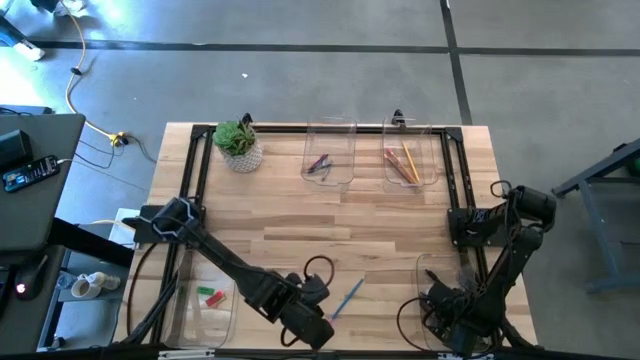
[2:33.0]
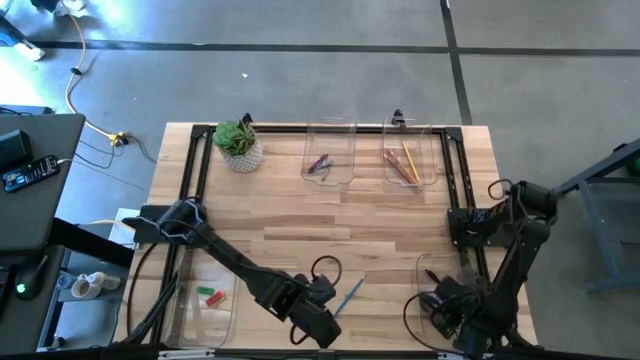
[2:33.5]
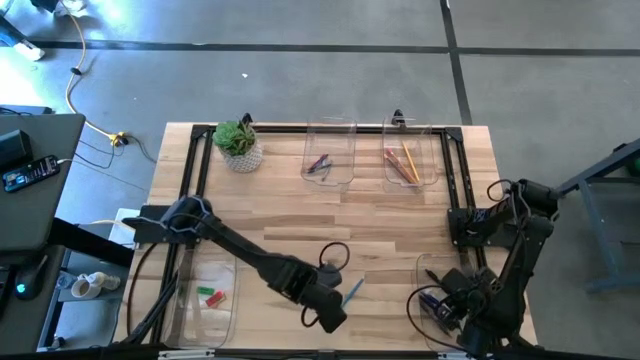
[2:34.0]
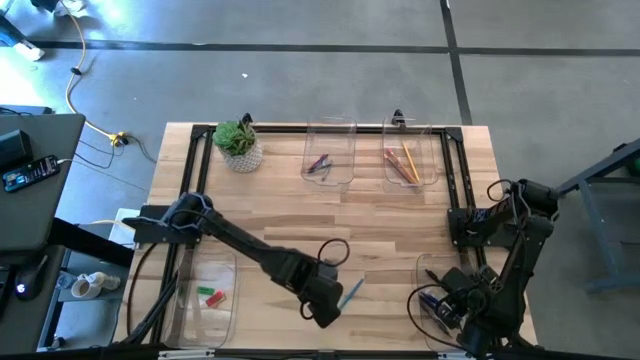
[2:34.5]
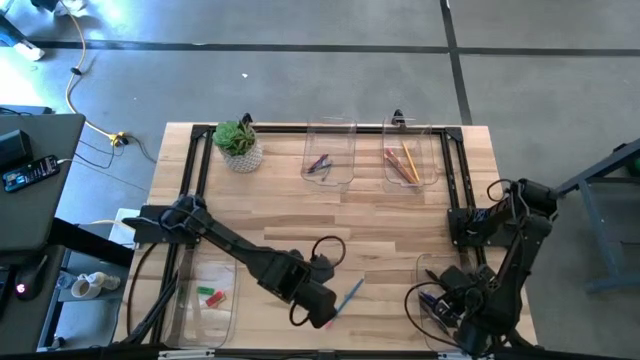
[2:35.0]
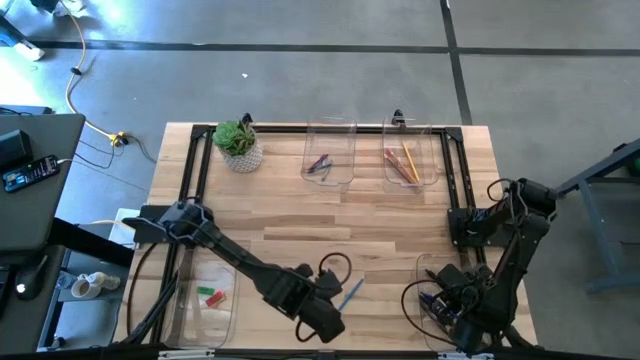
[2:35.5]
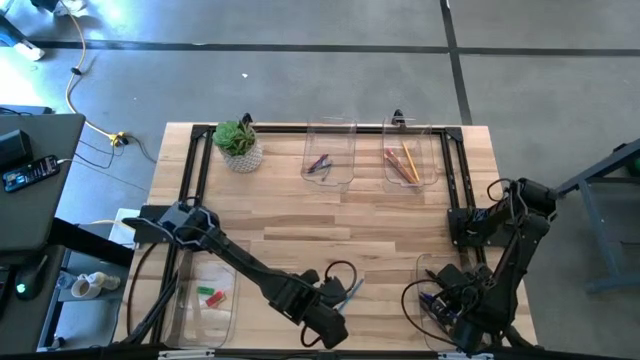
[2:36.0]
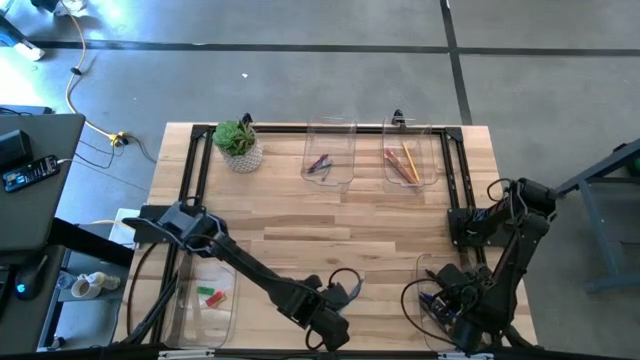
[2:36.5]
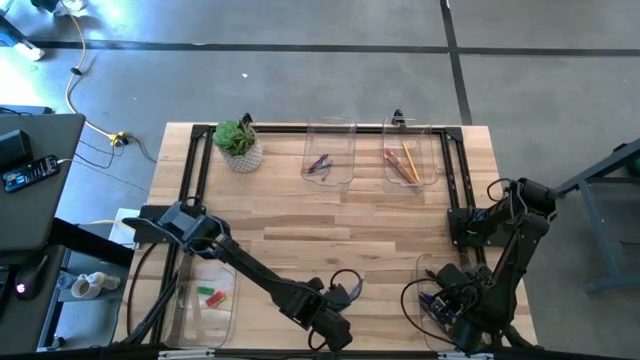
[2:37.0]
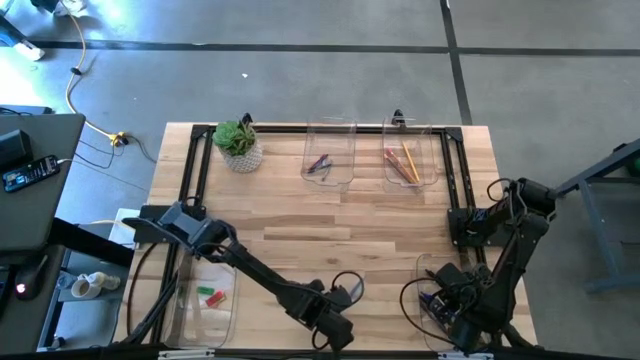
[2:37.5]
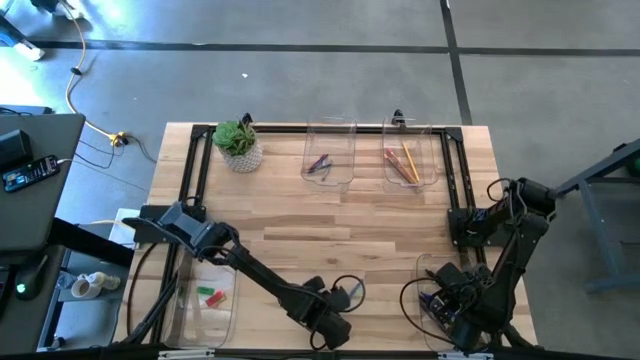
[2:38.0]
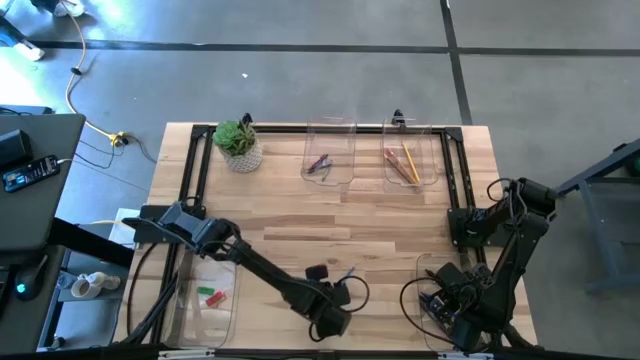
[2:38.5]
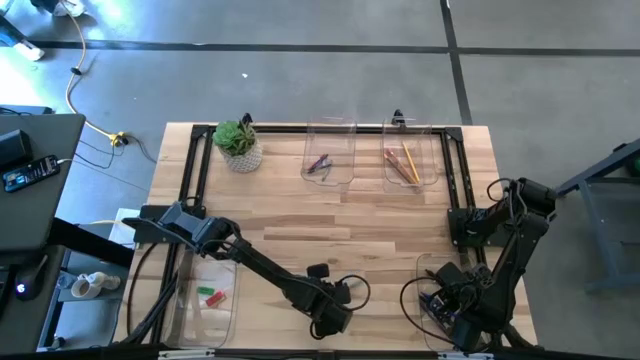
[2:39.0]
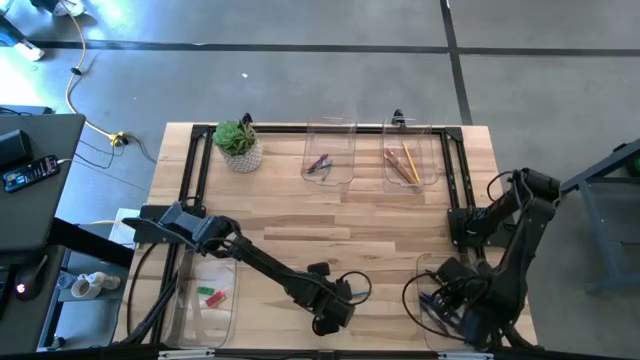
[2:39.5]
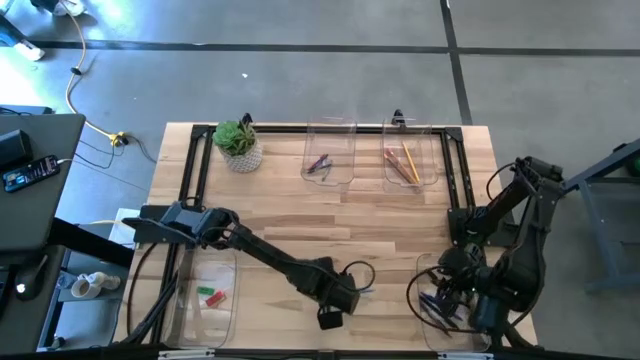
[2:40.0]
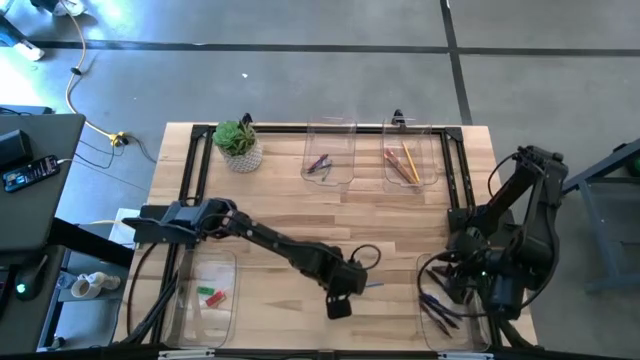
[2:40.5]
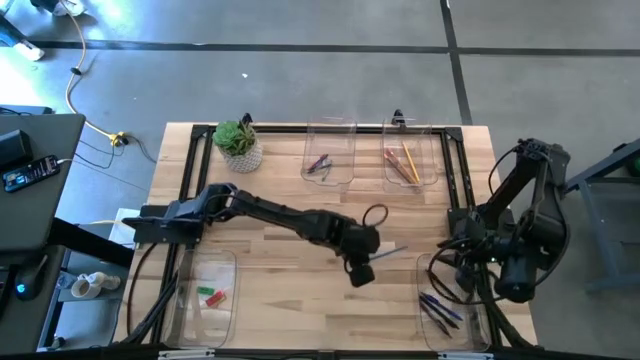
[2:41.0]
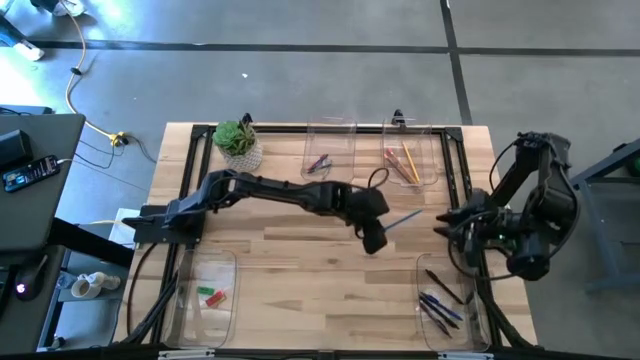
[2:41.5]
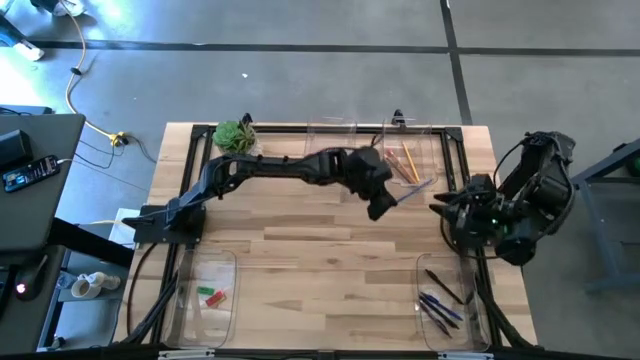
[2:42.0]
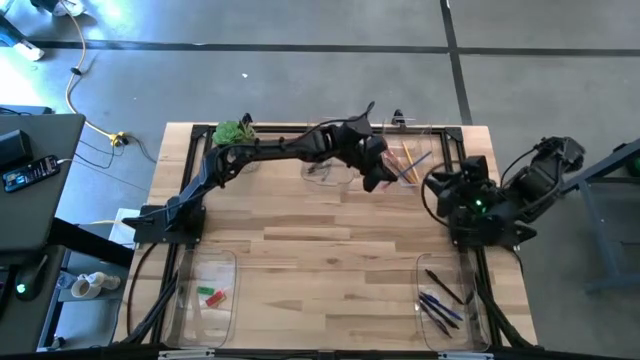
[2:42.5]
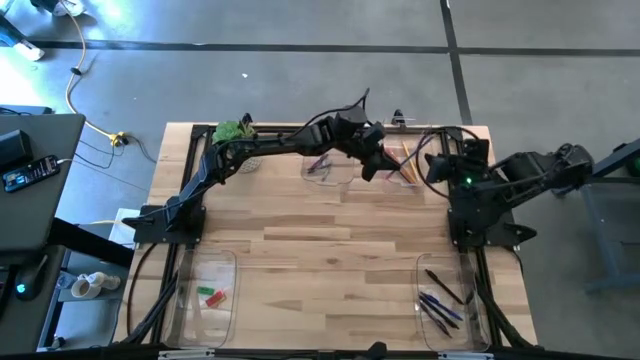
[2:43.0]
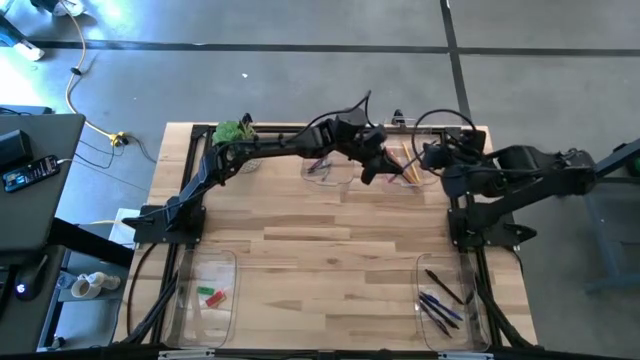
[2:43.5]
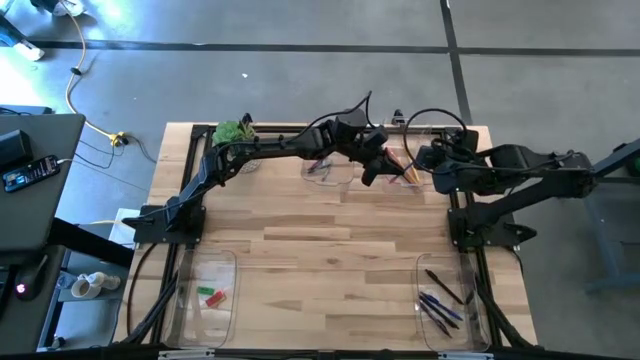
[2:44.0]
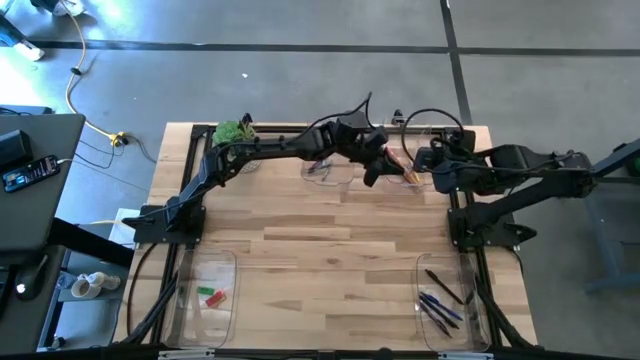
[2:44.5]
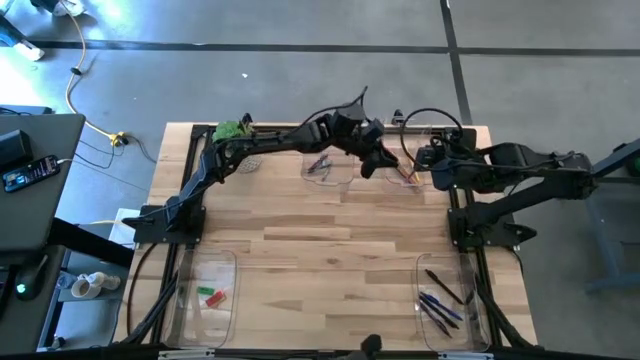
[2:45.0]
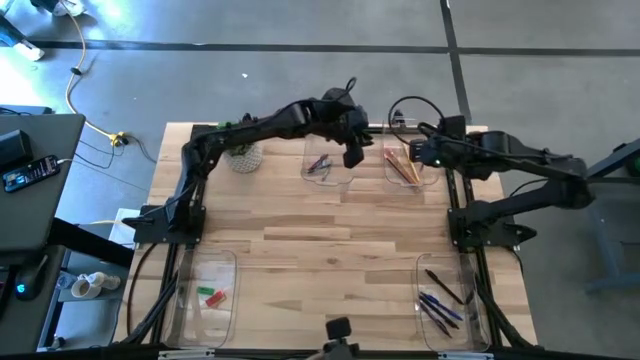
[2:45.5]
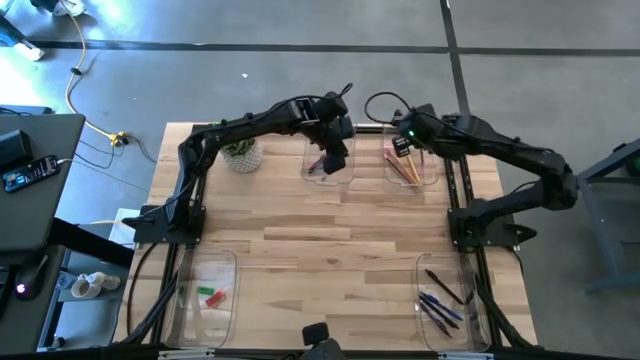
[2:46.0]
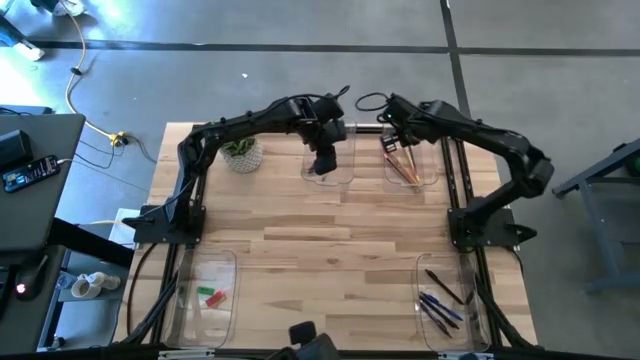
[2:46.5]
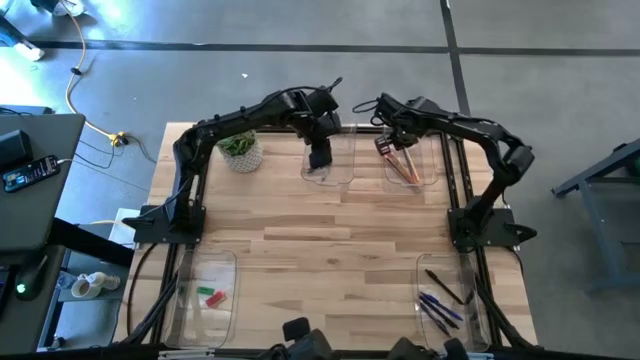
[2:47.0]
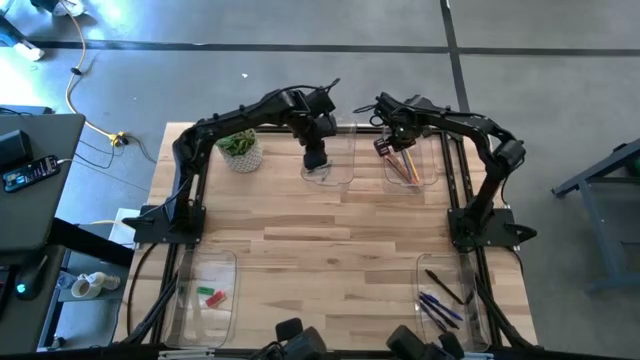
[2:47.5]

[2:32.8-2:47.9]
Task: Sort crayons/erasers/pens/pencils in bins
Put the light blue pencil into the top right transparent bin

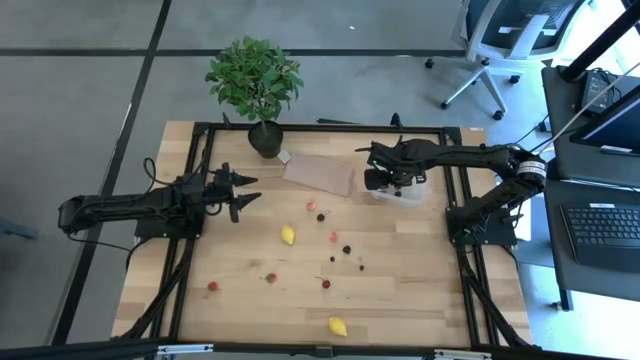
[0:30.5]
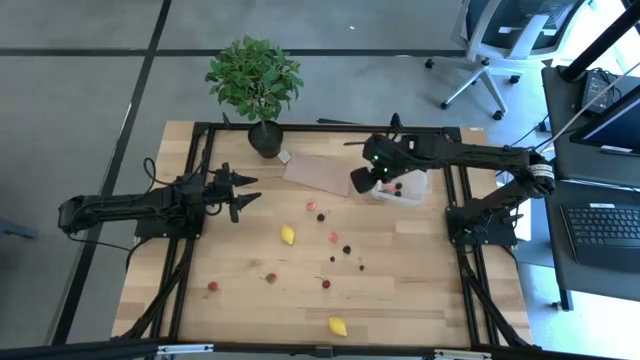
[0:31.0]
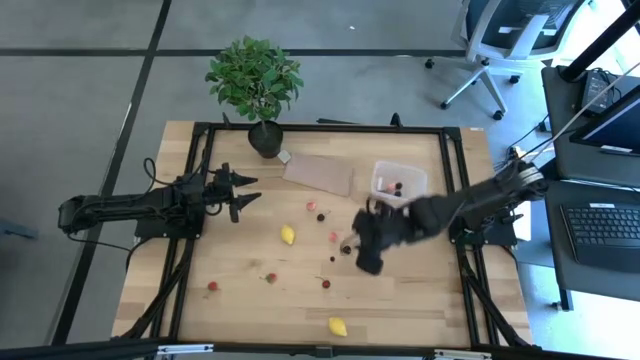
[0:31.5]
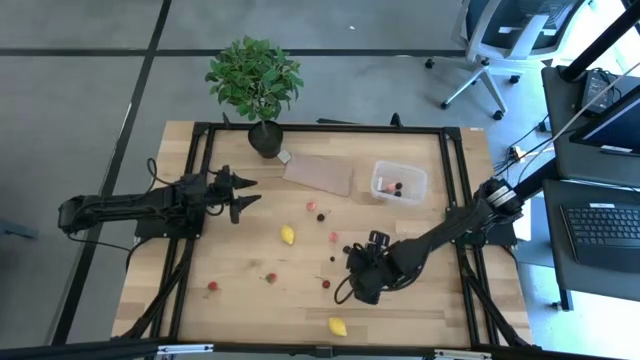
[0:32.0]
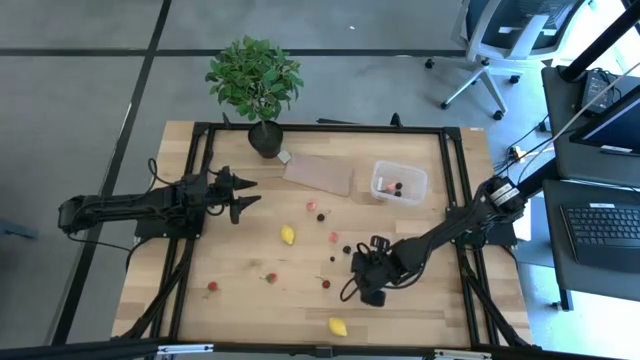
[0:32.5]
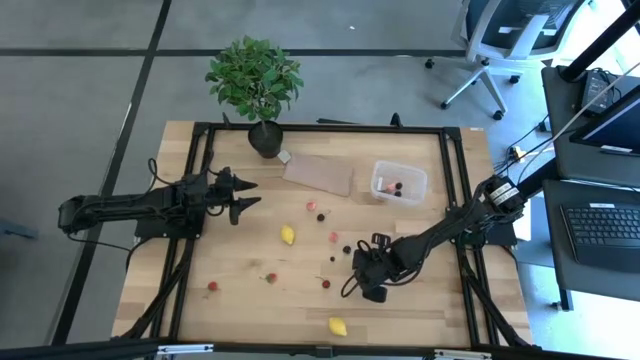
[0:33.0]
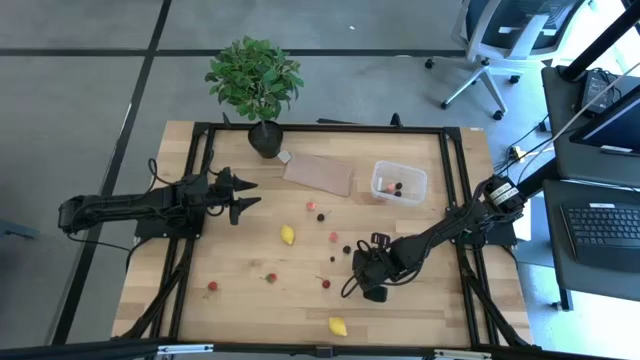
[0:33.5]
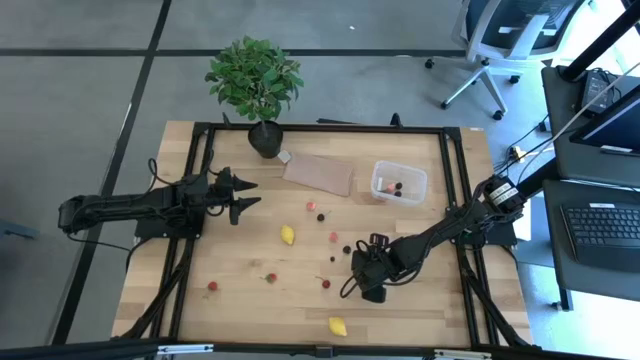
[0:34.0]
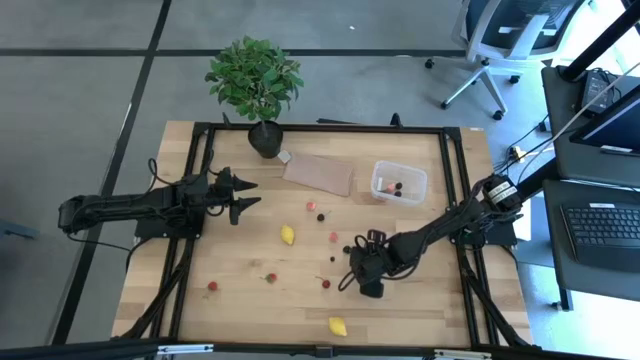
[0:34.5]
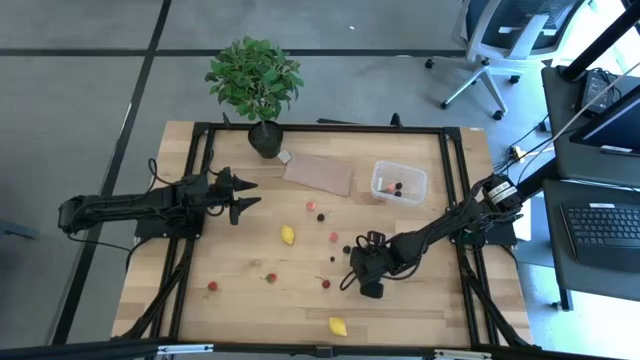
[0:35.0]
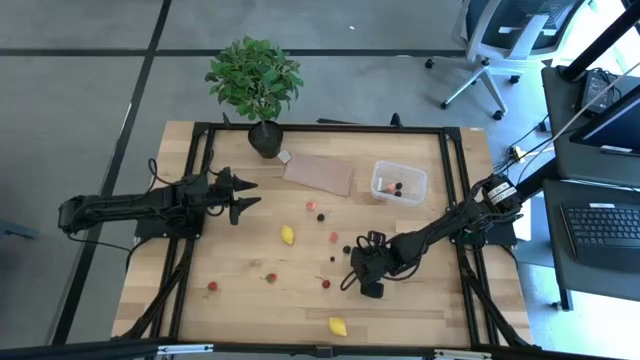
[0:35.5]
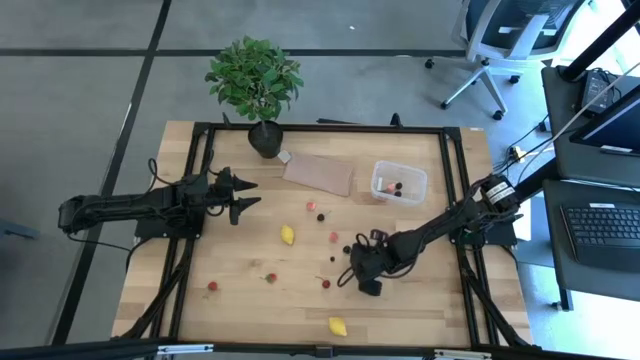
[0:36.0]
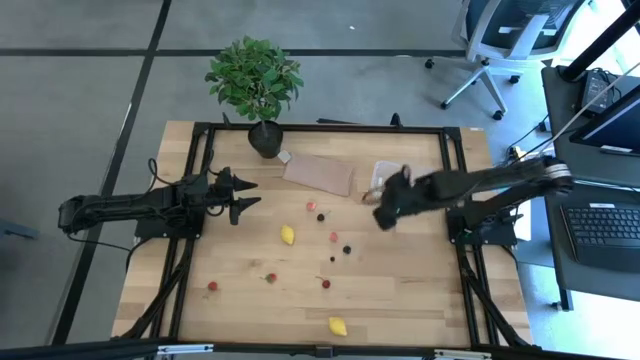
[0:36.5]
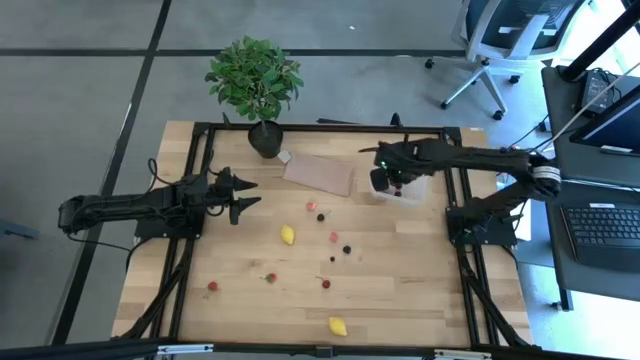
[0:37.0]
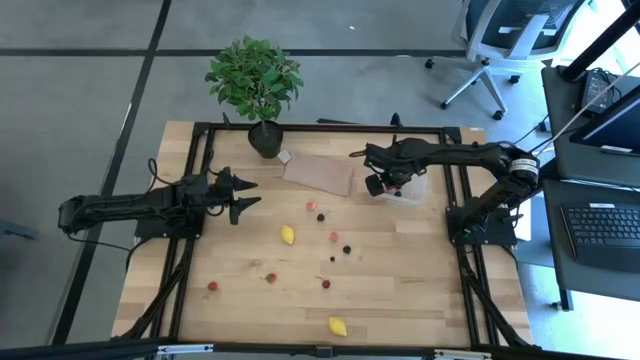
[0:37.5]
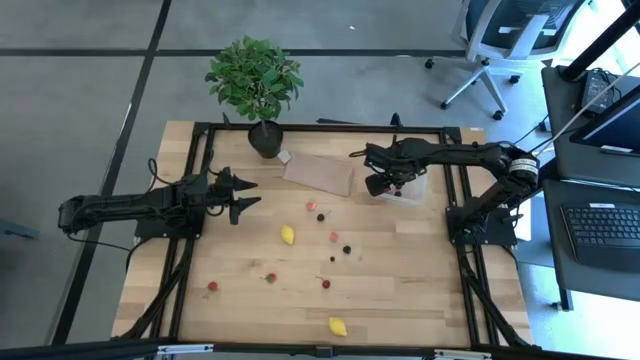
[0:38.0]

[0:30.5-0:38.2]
Task: Pick and placing Produce into tupperware
Put the right blueberry into the transparent container
